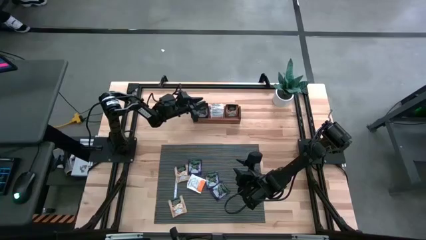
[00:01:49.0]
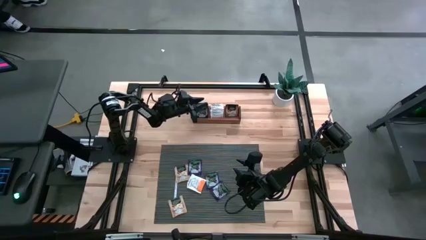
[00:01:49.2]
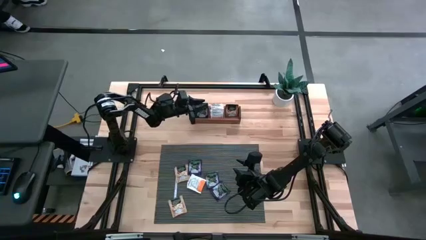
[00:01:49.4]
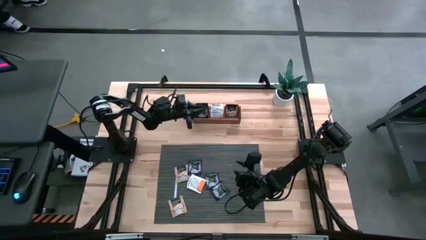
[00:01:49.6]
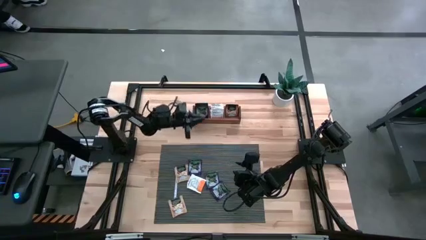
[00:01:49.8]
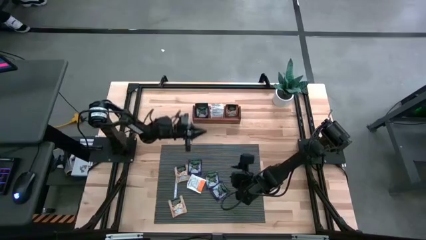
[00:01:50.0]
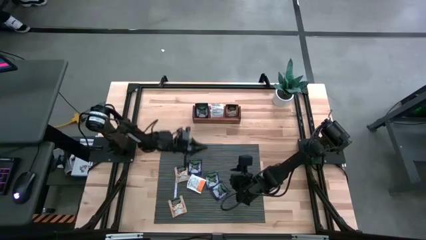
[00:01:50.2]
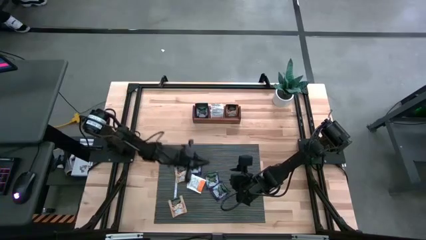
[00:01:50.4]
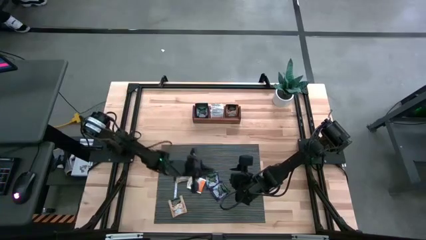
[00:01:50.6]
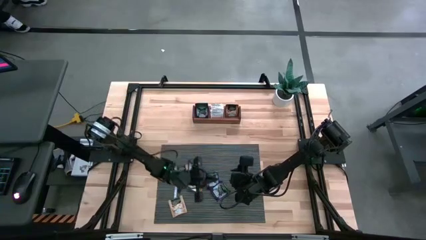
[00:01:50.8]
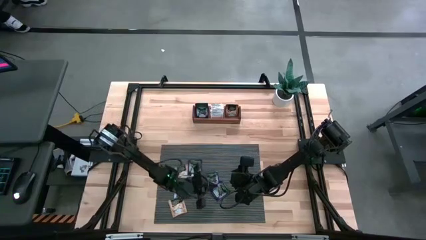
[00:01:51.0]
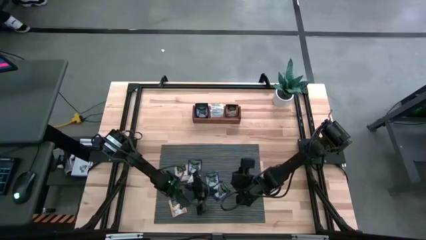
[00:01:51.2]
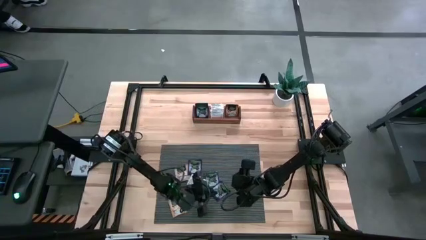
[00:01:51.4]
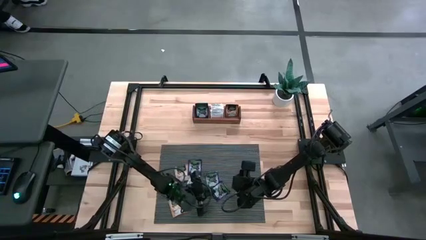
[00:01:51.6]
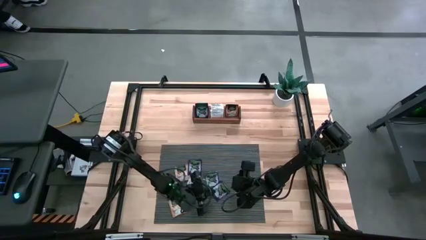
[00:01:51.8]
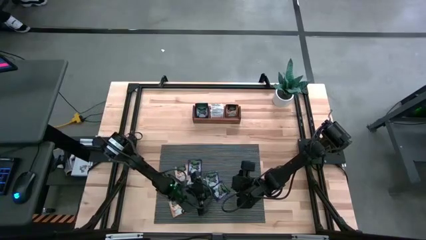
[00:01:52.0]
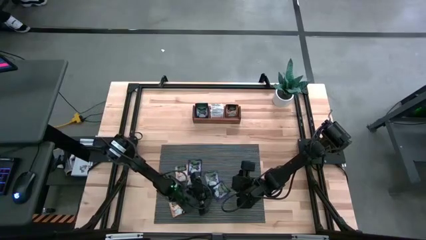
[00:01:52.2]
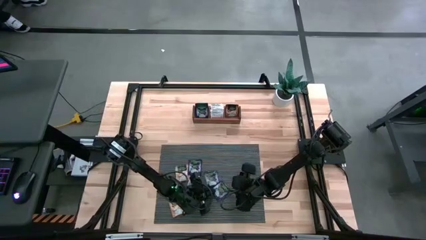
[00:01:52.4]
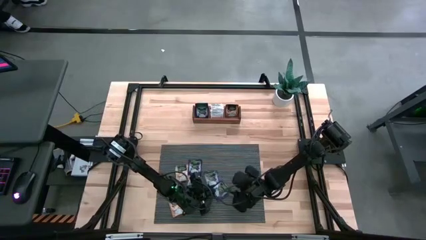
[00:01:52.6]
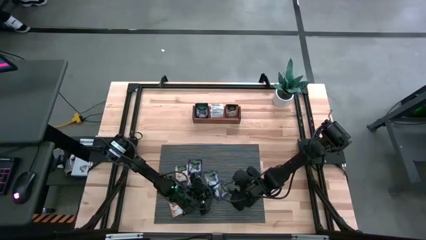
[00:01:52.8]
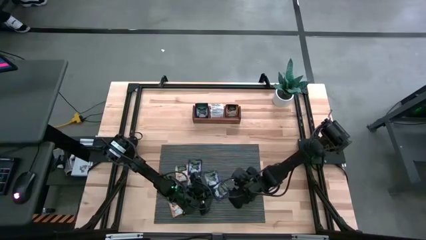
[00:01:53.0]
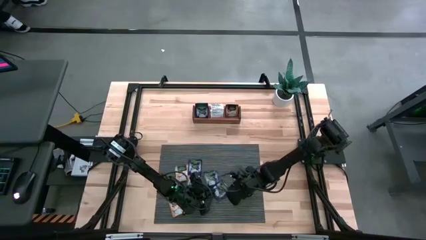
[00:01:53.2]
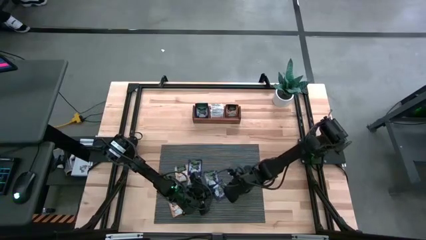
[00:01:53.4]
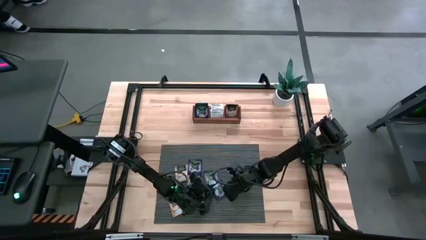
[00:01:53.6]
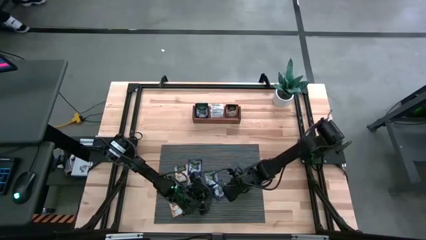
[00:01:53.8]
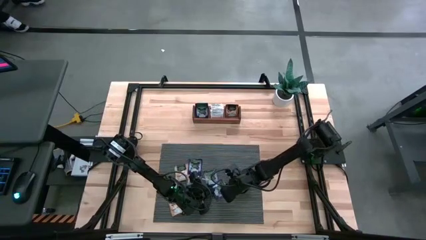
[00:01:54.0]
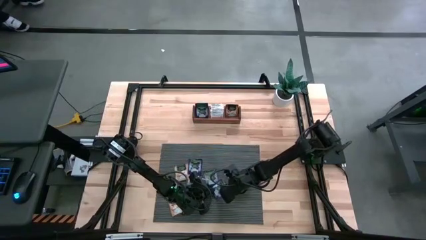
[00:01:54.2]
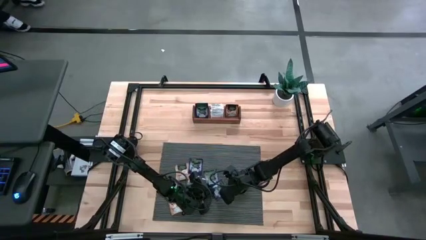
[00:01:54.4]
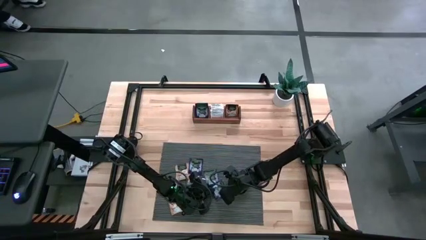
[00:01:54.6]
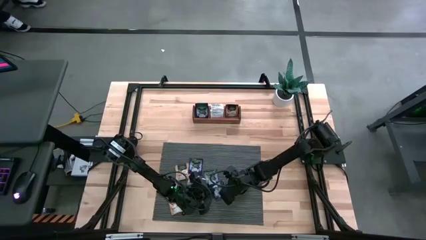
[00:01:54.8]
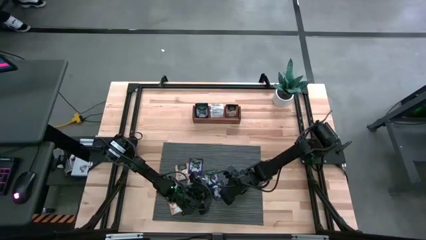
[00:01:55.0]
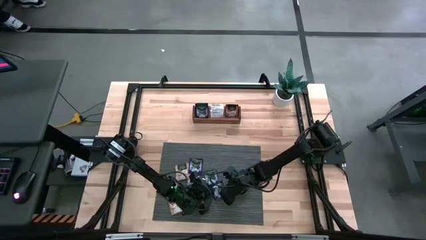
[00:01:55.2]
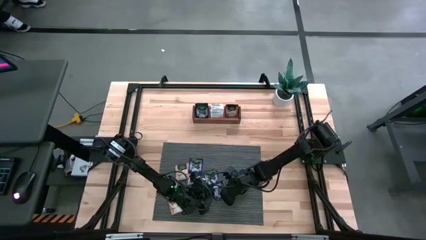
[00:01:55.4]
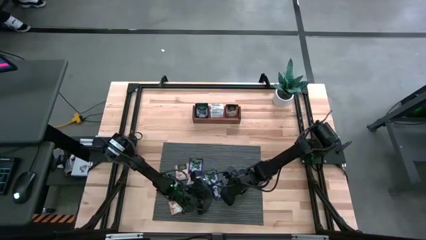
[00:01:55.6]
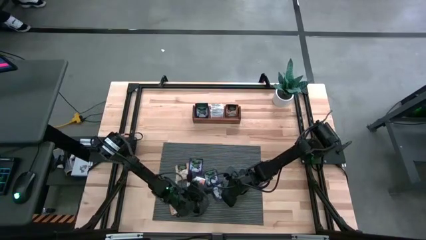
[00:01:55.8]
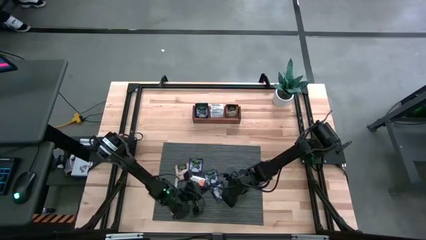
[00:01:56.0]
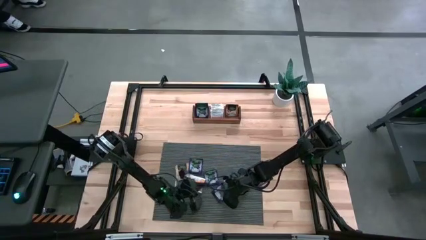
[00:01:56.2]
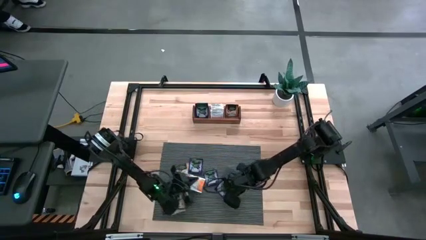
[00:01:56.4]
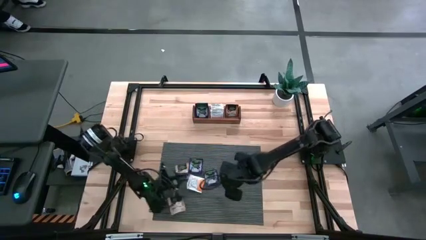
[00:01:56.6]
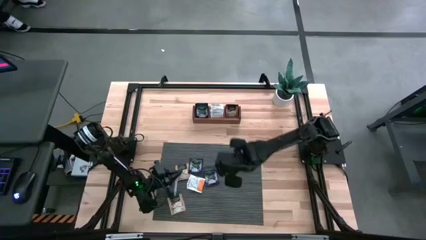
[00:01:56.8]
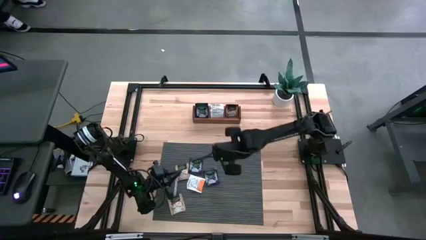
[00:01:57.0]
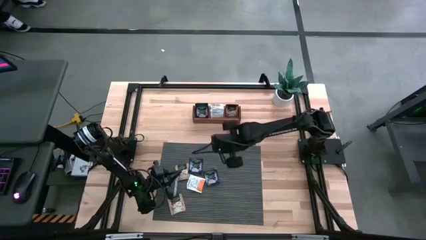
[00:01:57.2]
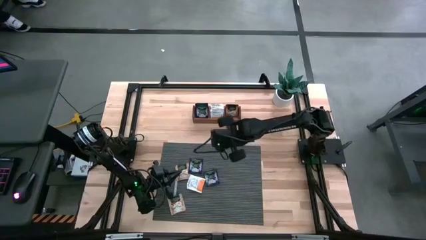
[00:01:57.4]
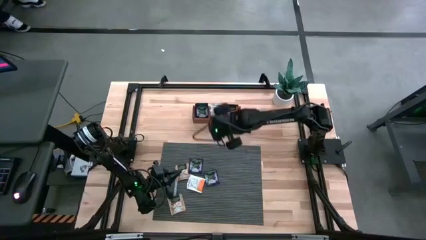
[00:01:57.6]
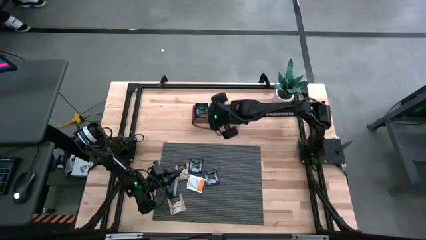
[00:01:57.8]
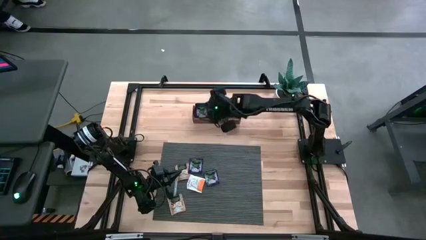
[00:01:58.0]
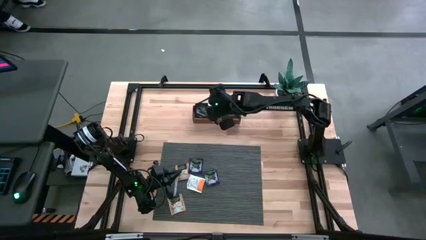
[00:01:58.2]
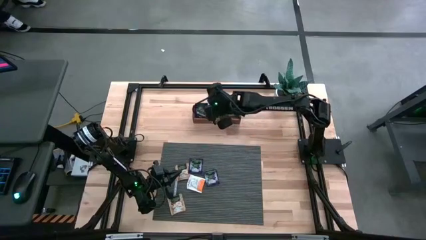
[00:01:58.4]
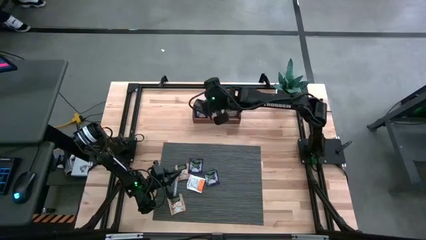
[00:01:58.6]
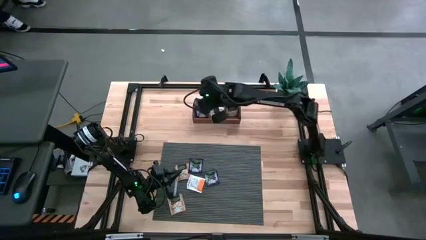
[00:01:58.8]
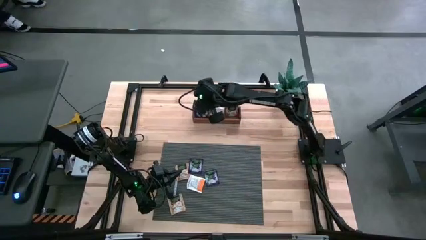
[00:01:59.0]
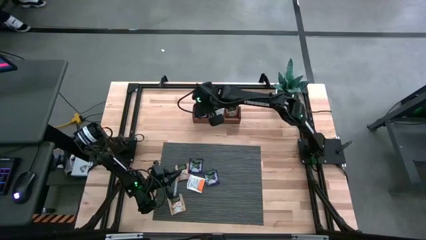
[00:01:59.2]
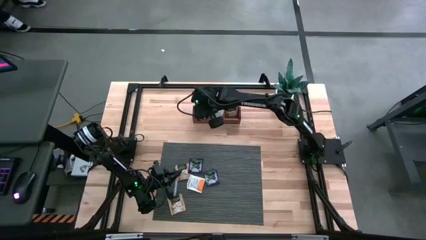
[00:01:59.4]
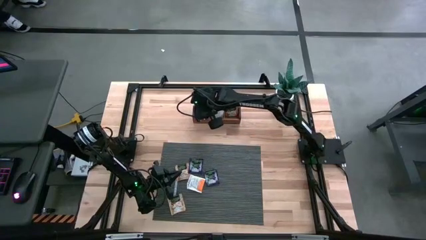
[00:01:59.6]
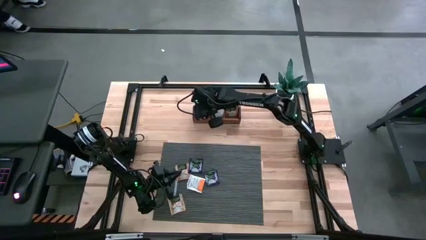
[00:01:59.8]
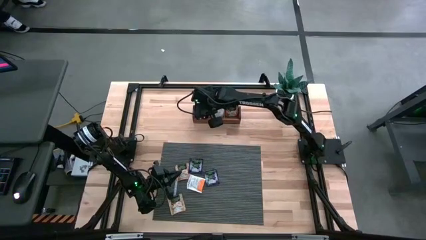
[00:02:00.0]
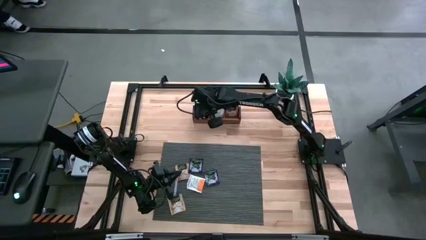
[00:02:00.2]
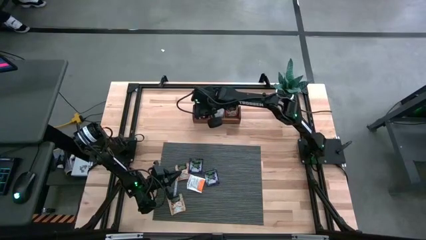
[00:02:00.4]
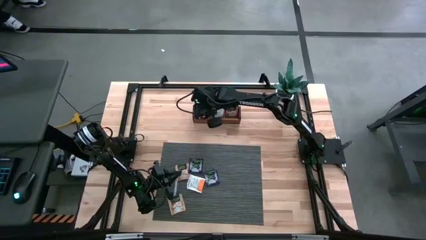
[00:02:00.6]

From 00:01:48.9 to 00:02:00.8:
Task: Pick & Place Tea
Put the purple tea bag into the left compartment of the wooden organizer

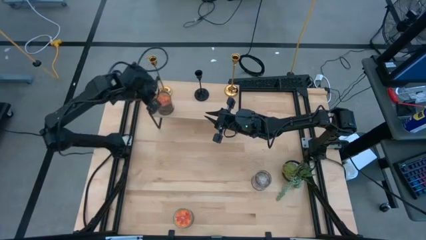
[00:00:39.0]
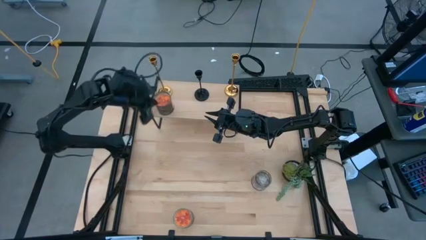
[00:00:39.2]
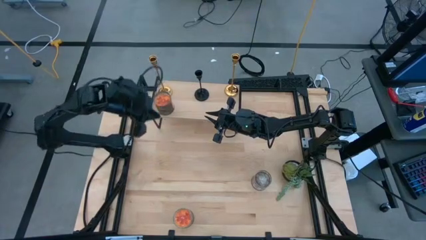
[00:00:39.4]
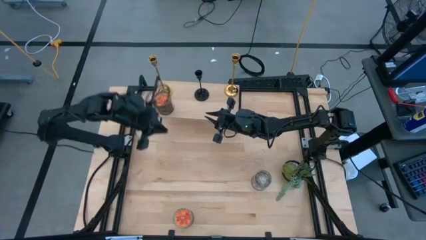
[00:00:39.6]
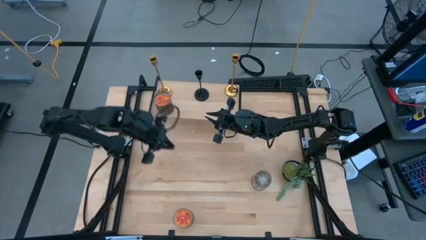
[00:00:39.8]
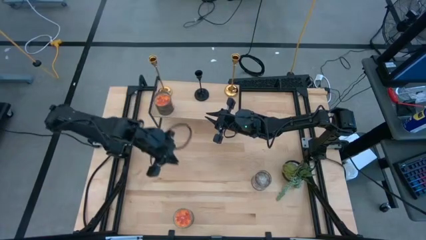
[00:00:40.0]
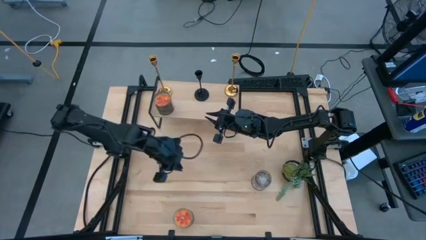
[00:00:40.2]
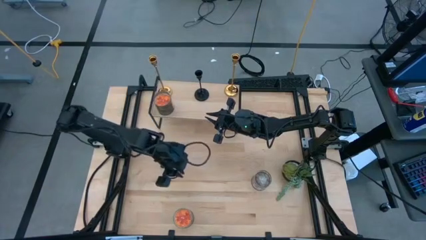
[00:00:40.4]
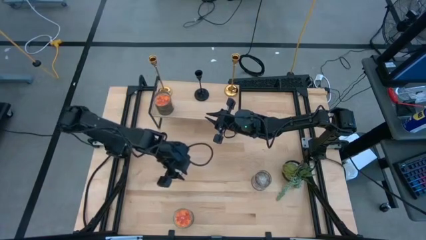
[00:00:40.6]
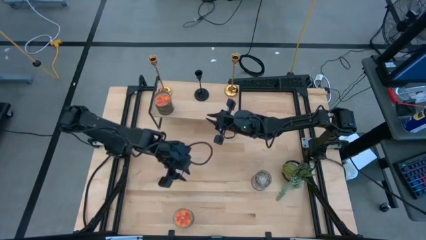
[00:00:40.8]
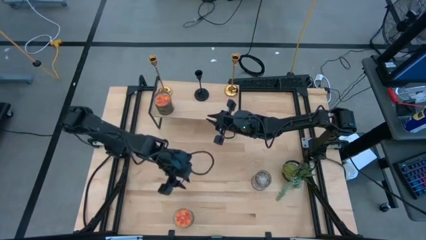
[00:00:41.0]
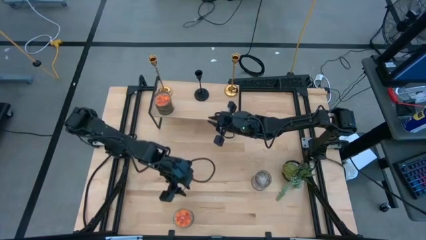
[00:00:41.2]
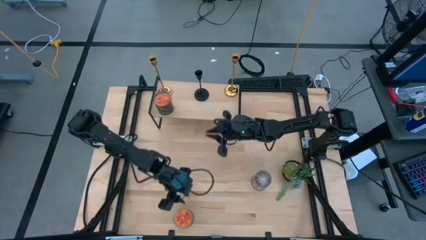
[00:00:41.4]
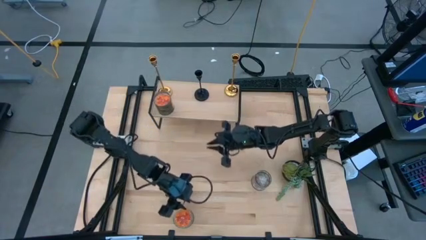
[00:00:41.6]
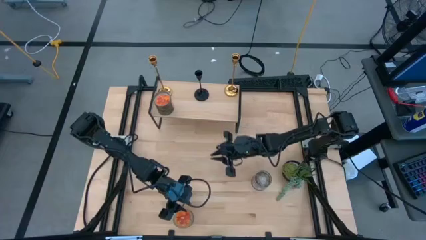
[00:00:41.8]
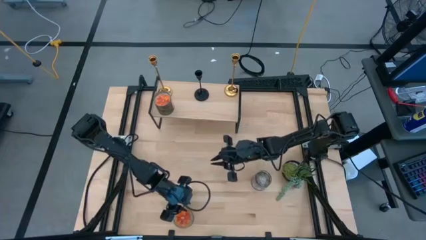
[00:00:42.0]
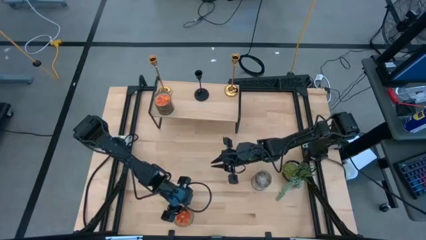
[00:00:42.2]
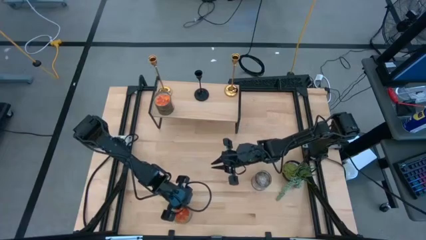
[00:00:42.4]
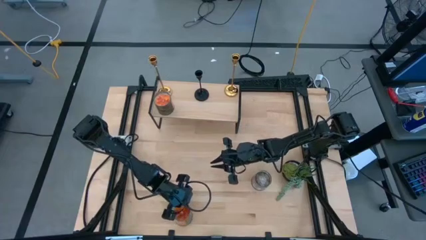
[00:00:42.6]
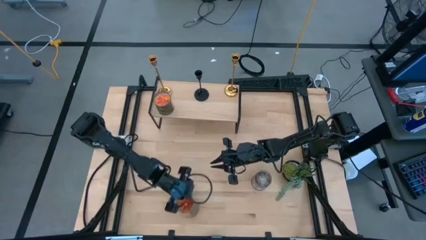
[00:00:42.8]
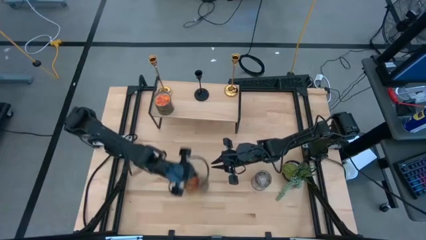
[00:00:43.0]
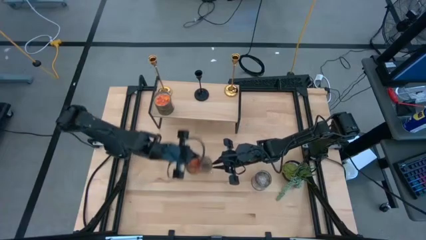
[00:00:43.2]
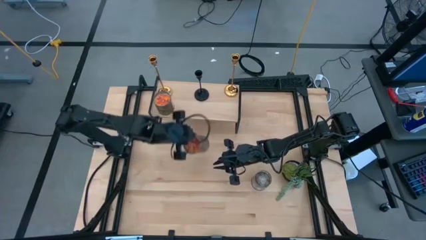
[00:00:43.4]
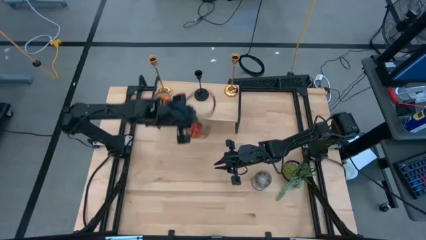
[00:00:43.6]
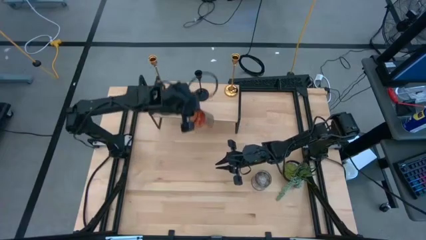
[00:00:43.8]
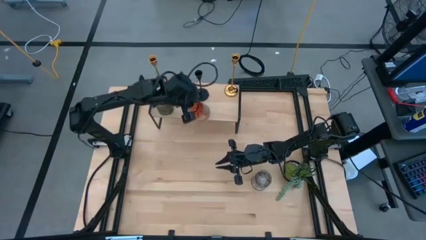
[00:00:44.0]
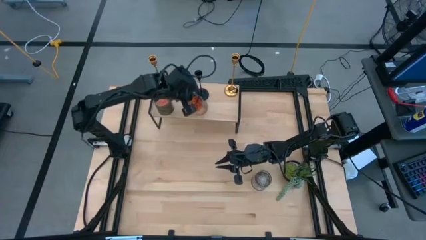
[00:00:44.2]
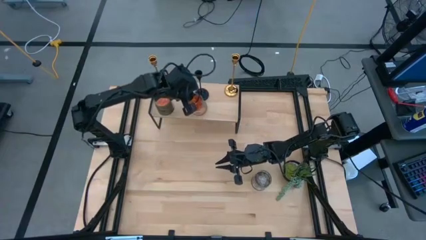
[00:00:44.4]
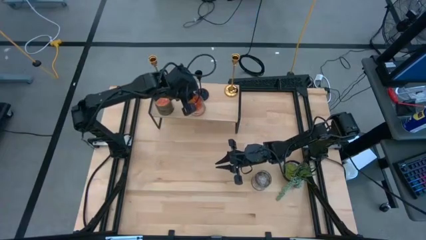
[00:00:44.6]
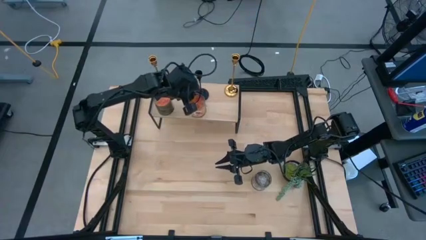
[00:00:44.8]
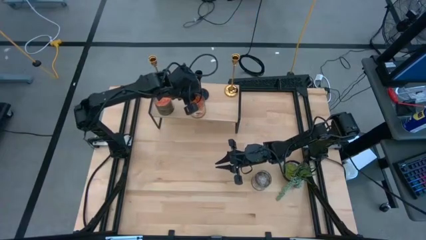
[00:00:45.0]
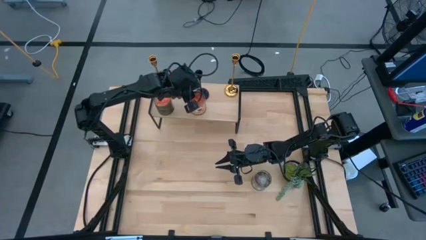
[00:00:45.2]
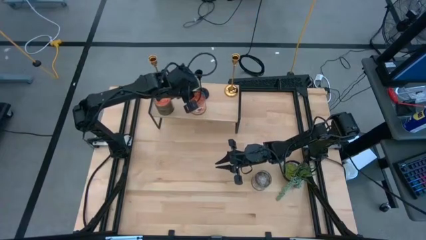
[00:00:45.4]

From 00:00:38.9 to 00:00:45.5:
Task: Pick & Place candle stick holders
Put the orange scented candle on the shelf aligned with the black candle holder
